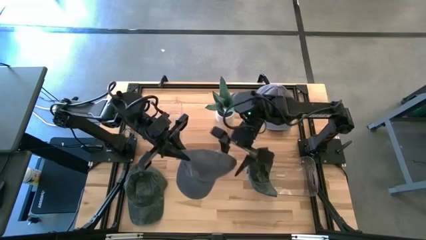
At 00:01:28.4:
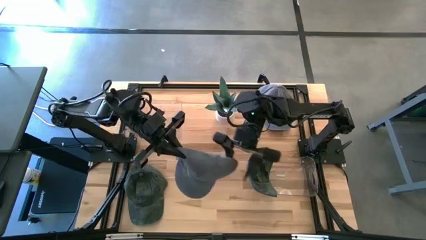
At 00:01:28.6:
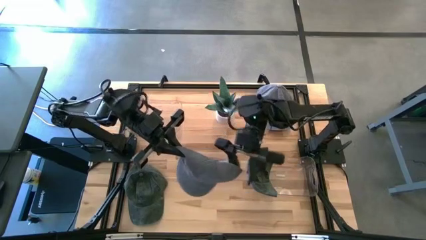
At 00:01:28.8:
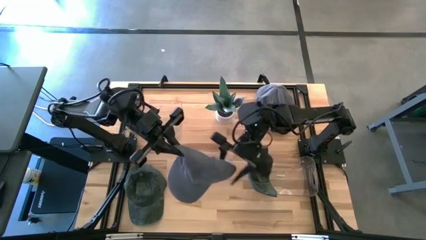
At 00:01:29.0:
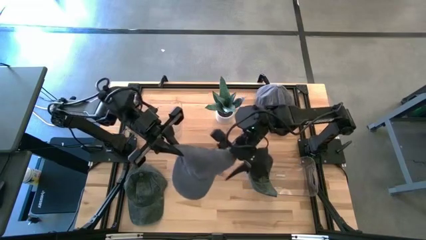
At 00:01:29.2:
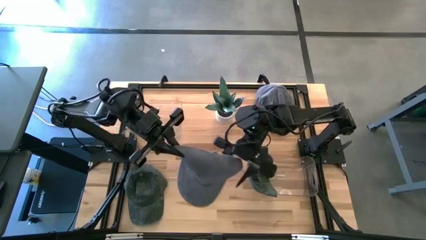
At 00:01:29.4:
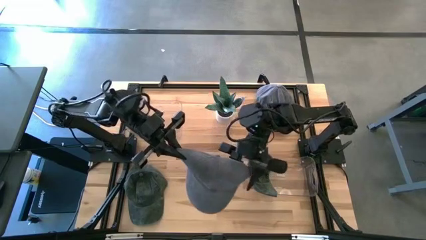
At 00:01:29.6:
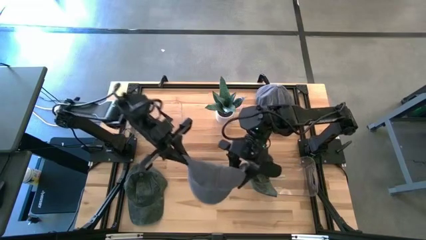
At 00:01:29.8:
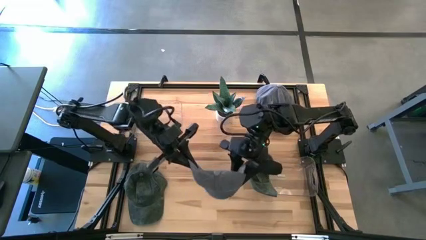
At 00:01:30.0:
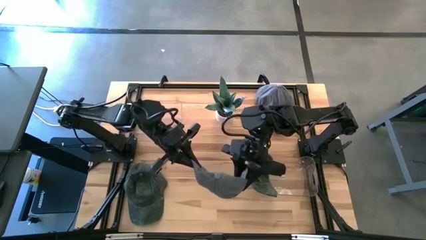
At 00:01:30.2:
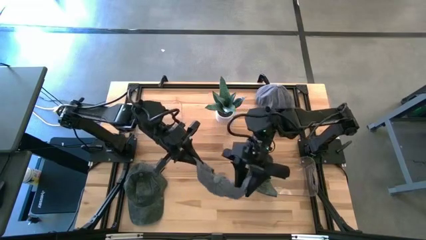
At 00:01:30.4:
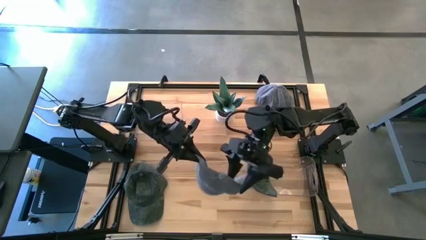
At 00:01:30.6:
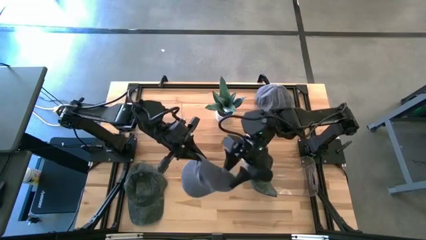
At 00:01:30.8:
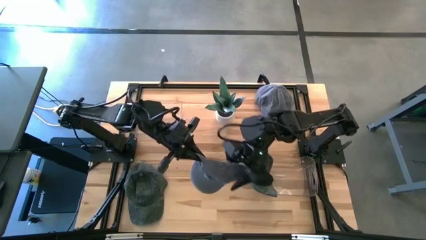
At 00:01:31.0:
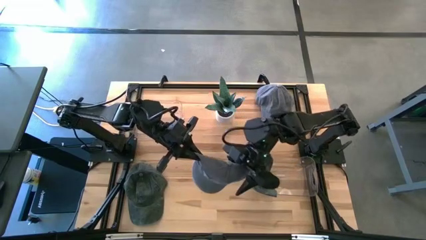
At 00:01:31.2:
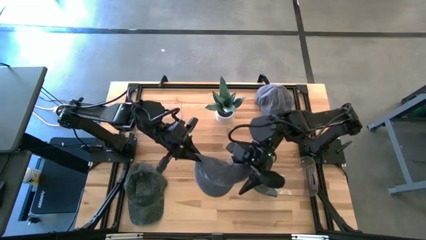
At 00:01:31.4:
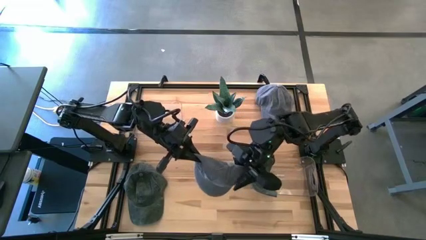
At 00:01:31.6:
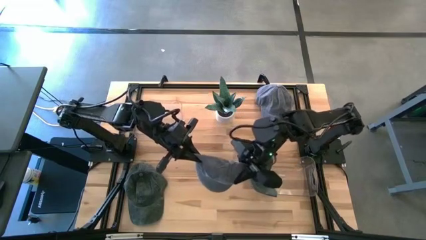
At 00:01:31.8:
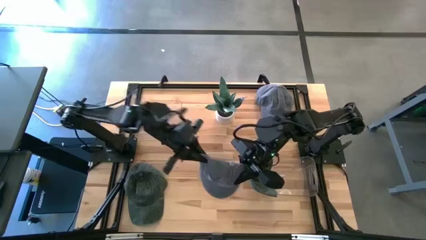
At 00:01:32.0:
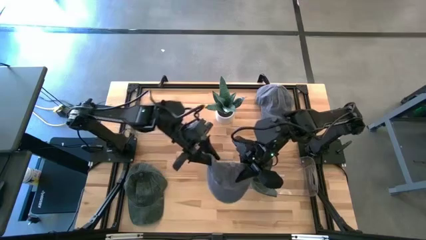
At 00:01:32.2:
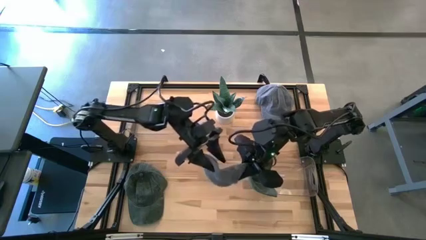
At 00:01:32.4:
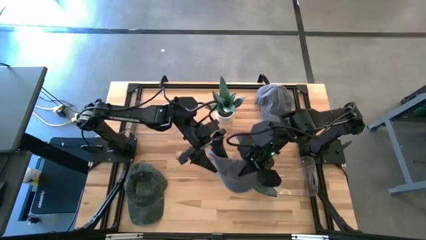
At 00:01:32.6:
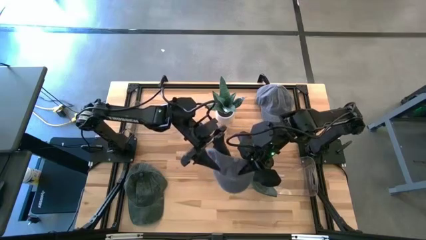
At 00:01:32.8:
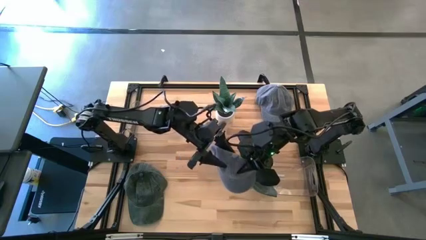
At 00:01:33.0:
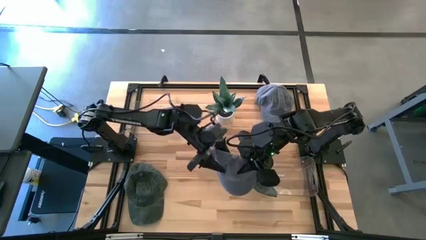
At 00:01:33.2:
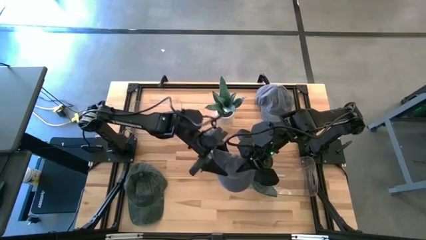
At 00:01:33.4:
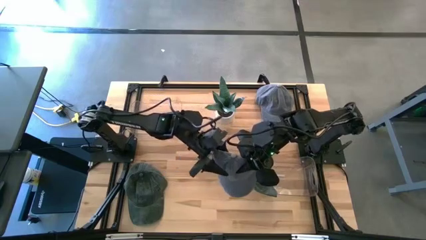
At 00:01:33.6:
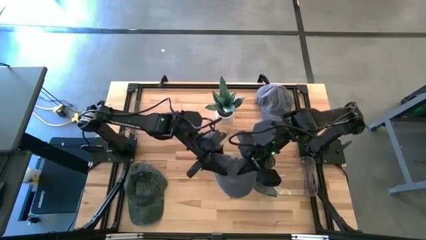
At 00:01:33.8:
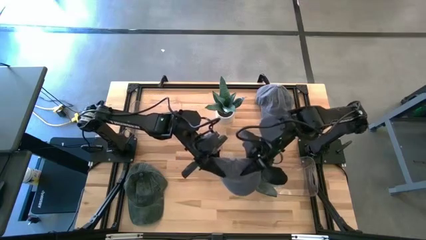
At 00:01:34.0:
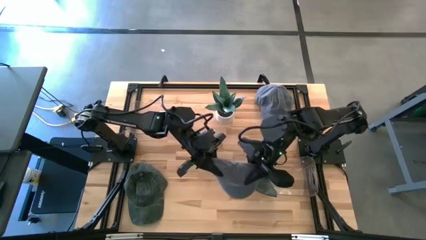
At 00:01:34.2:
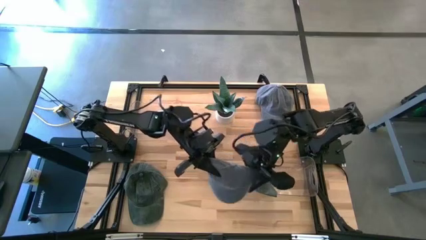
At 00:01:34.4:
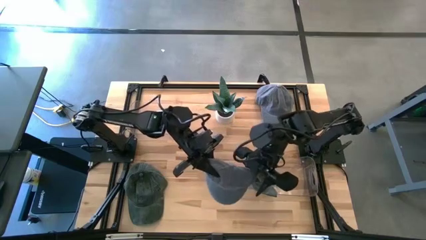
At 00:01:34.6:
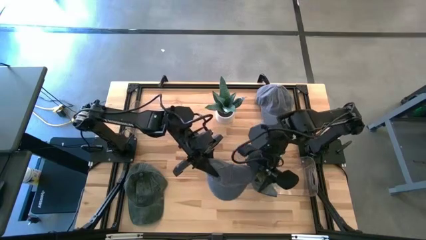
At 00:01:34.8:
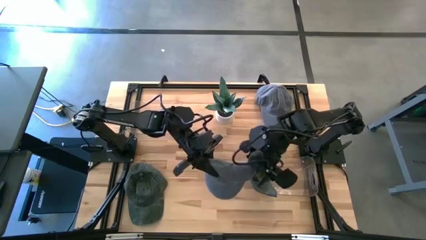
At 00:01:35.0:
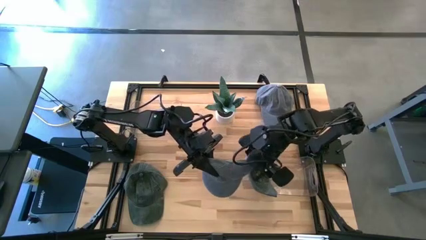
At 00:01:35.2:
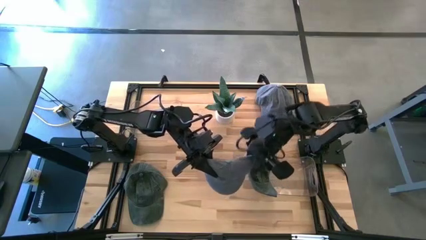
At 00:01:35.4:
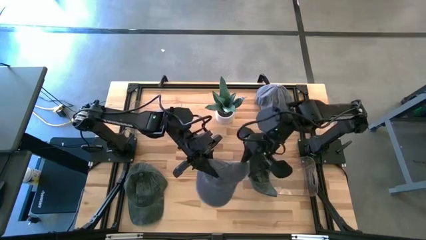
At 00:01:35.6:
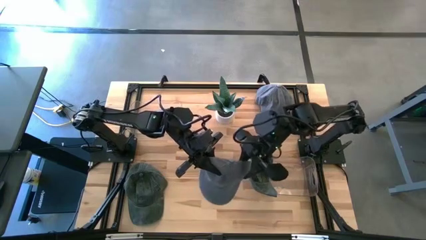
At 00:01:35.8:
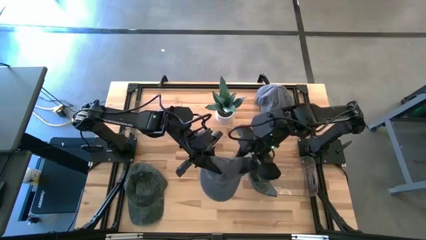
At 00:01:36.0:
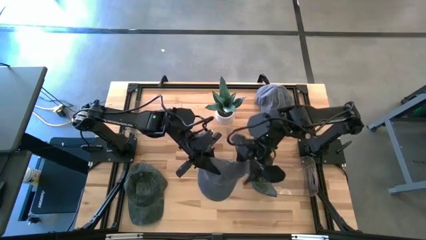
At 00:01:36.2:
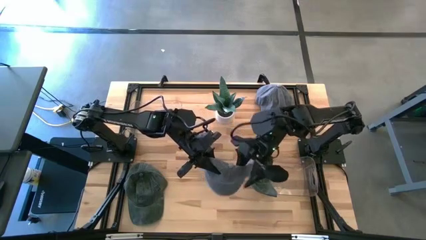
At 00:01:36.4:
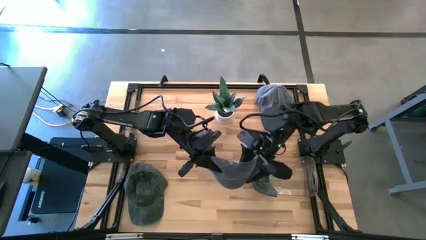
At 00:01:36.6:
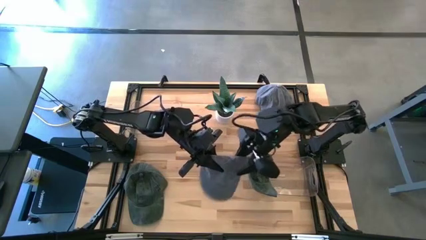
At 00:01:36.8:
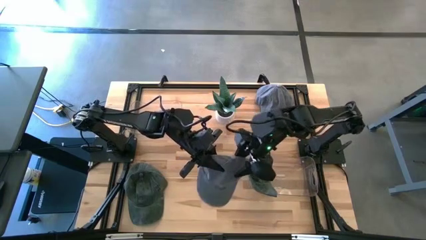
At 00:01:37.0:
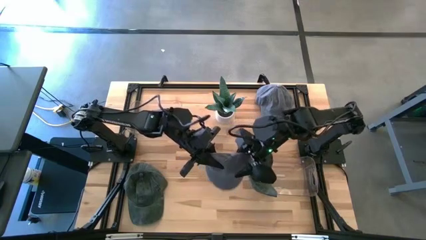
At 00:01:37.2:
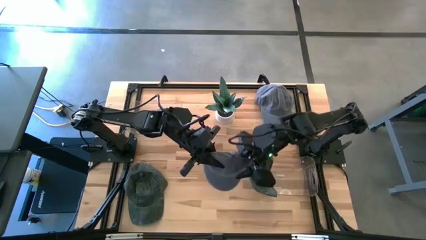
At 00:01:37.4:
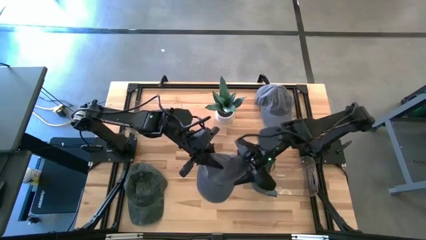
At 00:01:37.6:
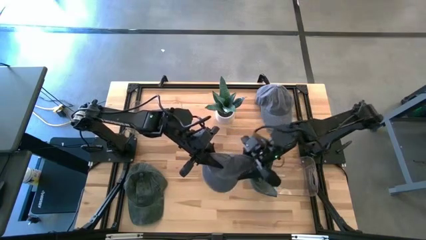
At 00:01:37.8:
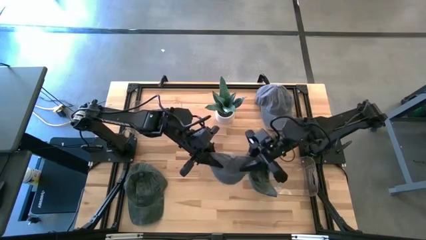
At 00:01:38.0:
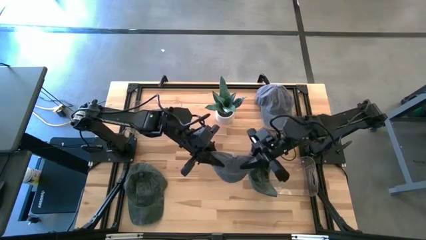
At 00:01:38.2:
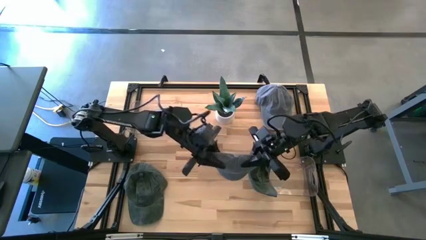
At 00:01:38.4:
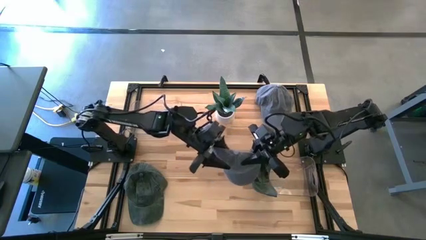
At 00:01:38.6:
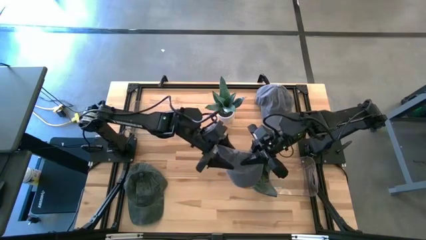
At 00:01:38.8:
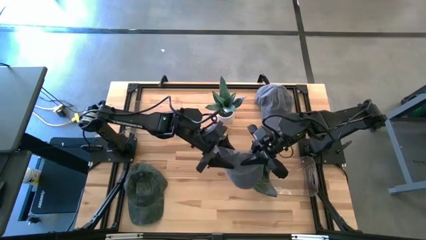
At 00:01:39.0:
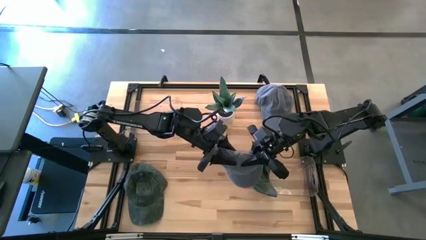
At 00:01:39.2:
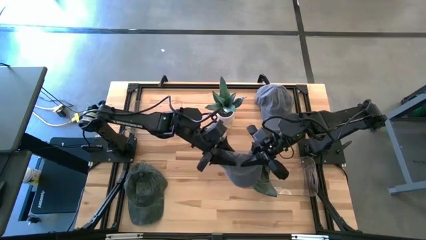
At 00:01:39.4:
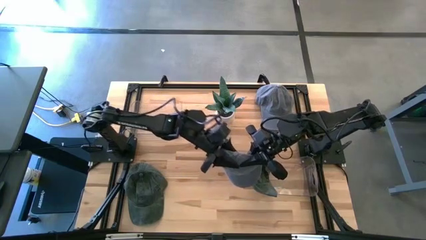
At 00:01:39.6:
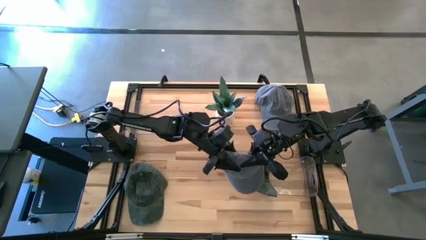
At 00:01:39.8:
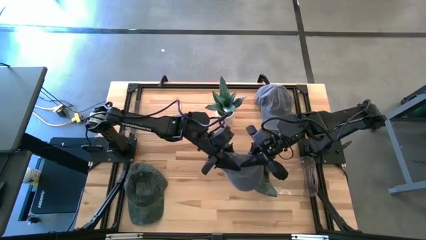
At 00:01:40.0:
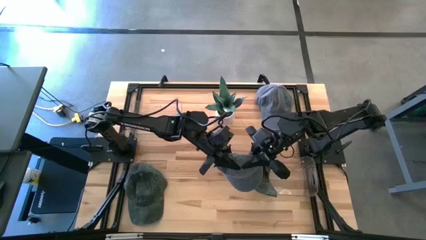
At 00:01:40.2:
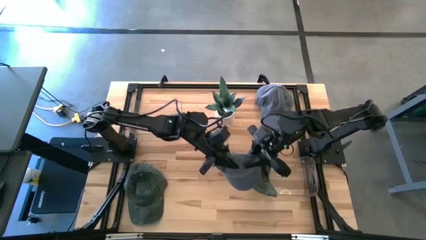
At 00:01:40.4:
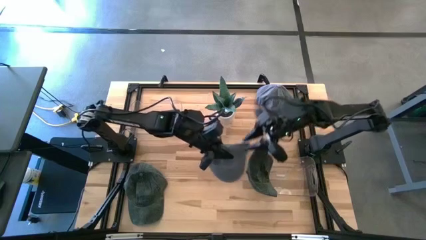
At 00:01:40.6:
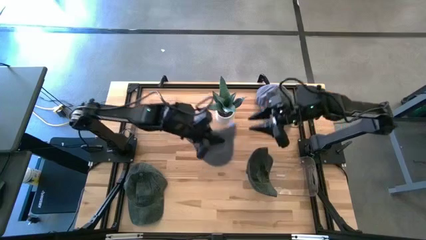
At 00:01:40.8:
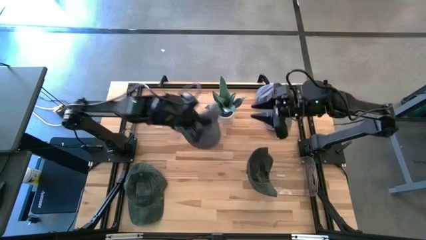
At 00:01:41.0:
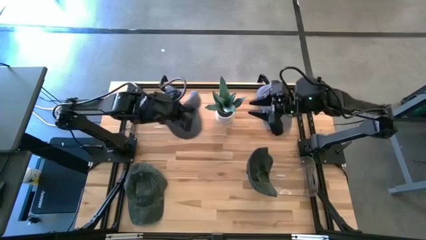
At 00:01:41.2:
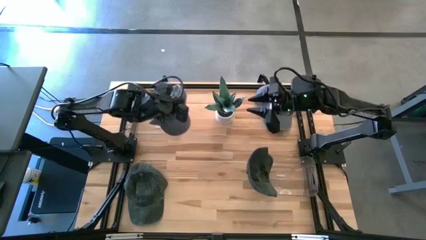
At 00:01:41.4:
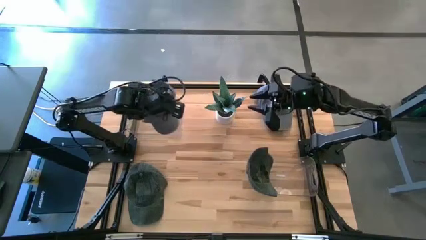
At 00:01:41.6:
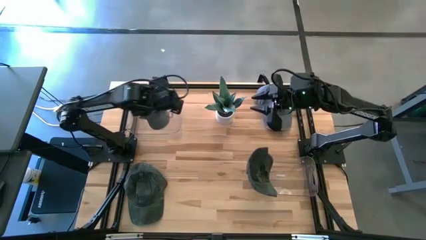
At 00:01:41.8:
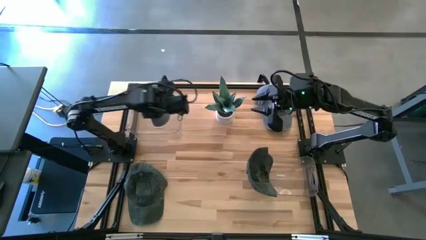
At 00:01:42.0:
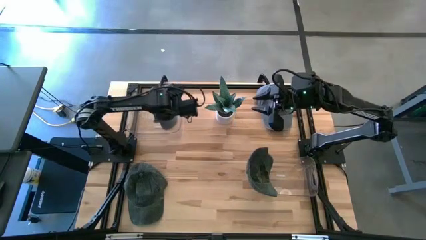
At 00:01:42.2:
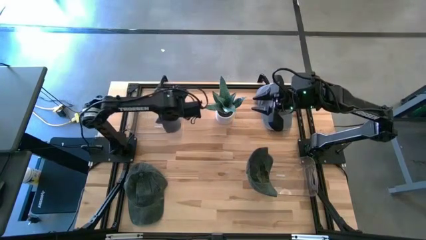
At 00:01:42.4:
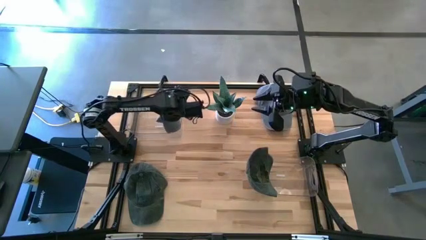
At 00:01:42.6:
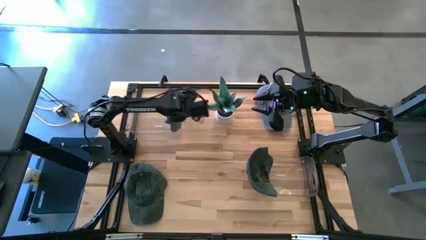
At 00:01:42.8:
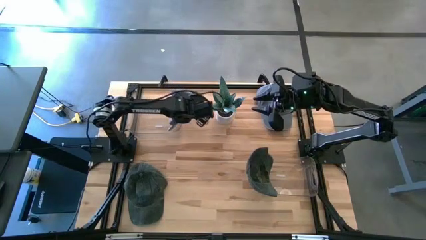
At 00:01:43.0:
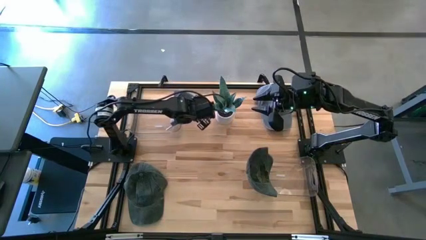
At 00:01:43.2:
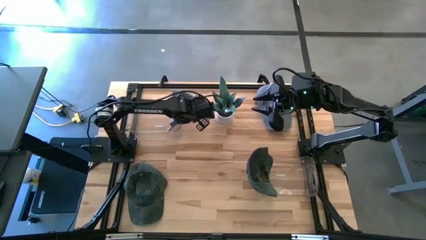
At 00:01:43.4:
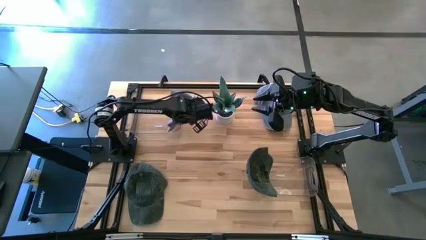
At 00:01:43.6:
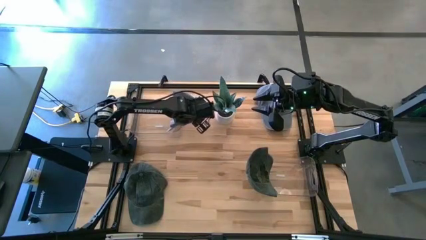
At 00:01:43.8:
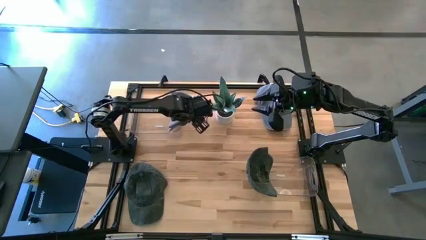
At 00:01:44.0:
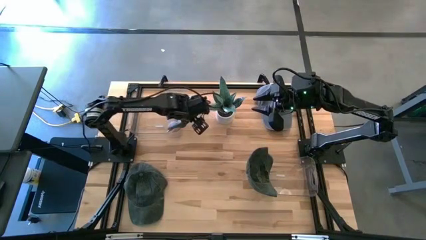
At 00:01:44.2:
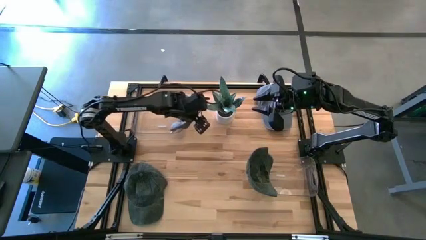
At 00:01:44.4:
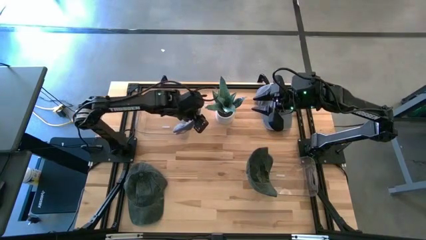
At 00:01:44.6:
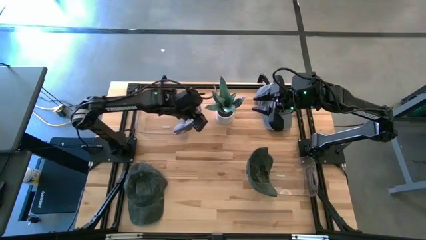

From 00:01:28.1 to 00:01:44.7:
Task: Pick & Place hat
Put the left gray cap into the left transparent bin

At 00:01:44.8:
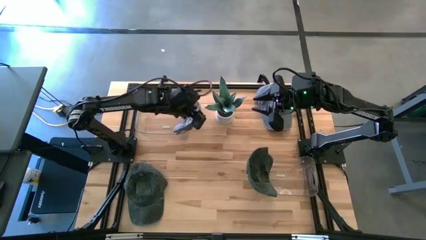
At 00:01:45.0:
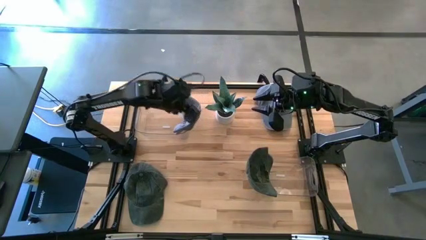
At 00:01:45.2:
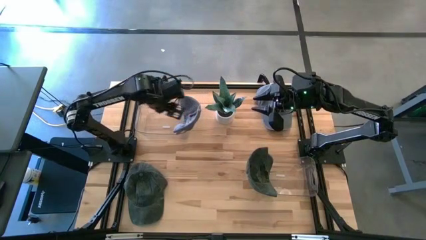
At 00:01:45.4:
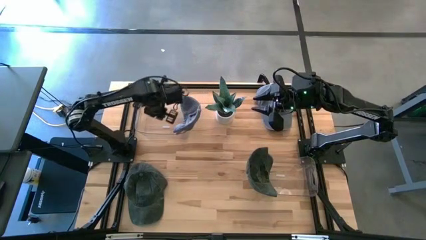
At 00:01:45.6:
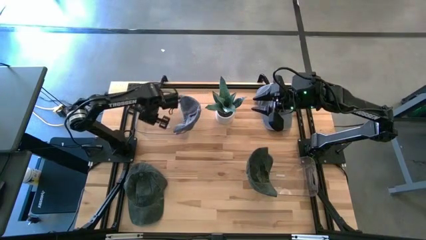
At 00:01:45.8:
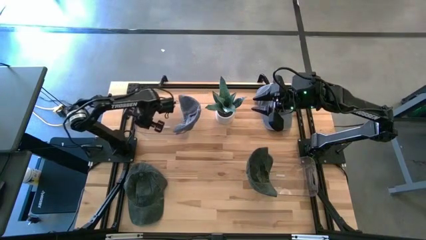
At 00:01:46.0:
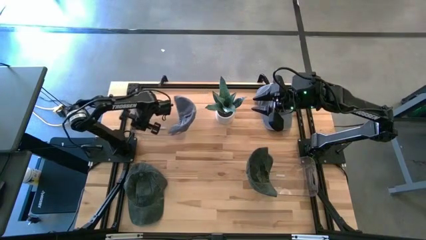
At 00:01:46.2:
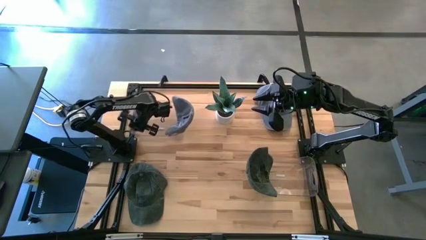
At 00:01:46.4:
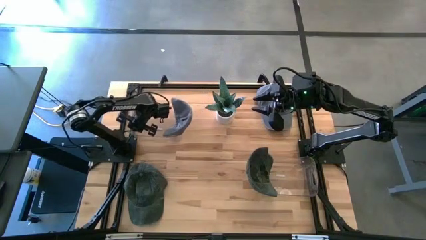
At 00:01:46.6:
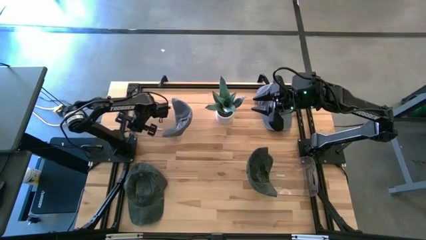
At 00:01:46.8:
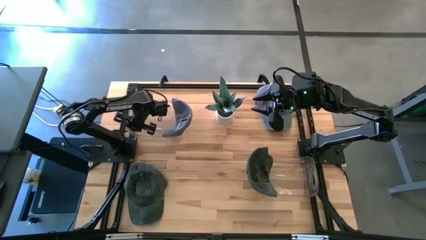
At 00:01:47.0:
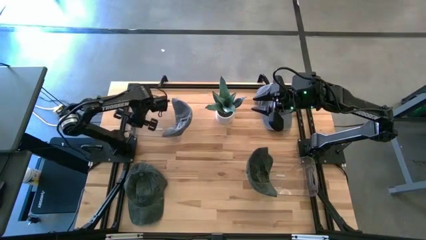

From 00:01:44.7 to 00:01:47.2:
Adjust the left transparent bin
